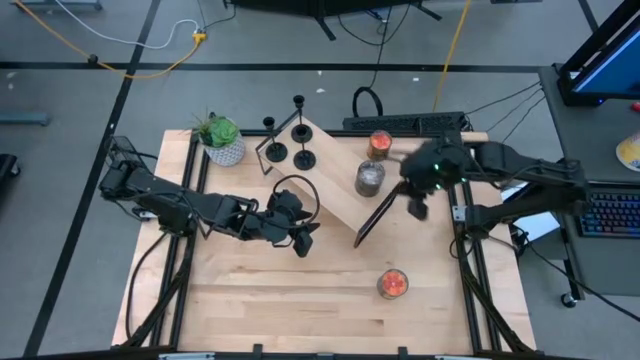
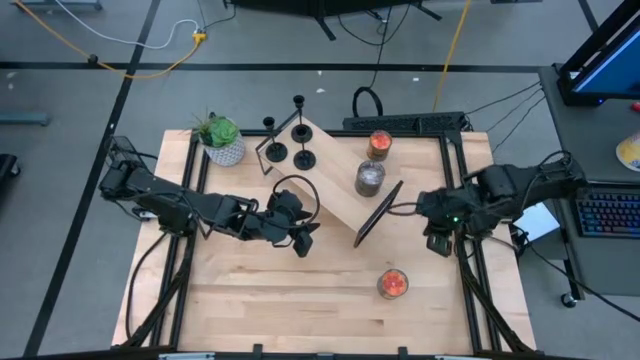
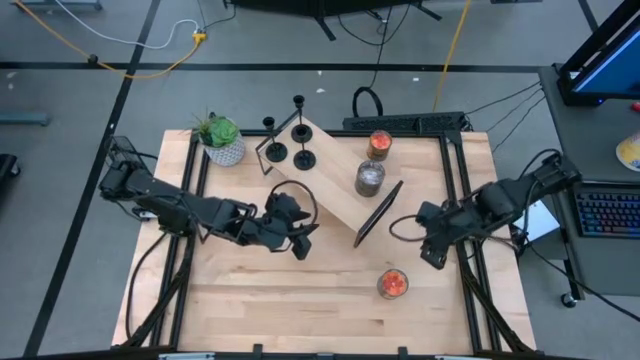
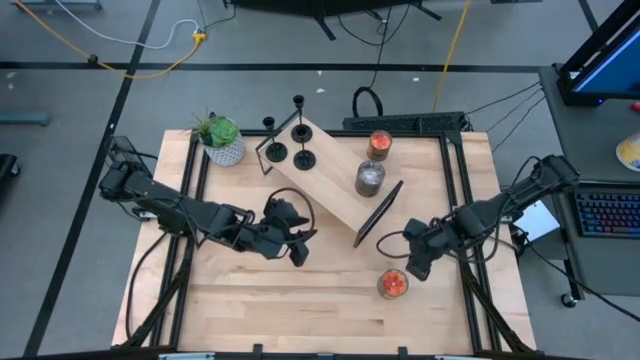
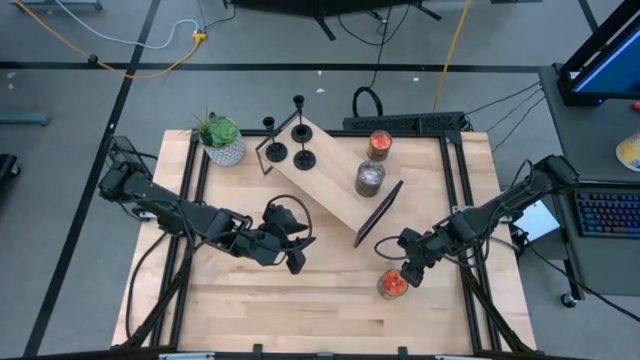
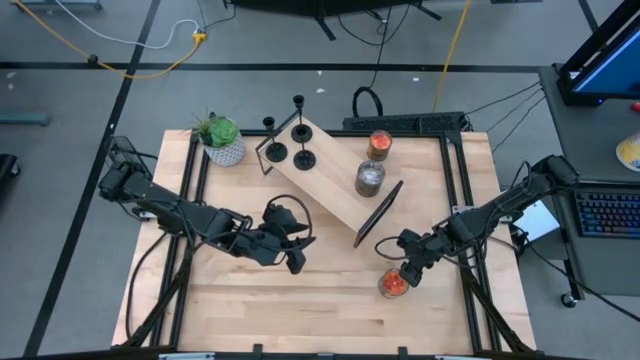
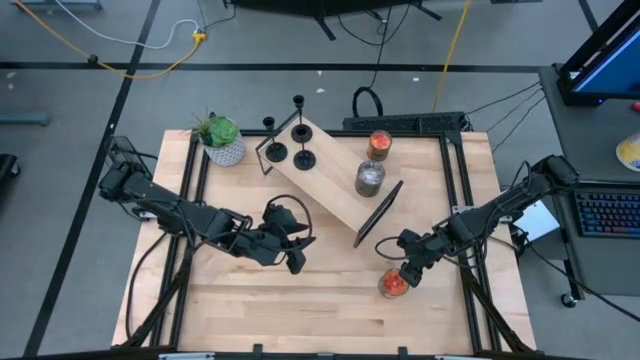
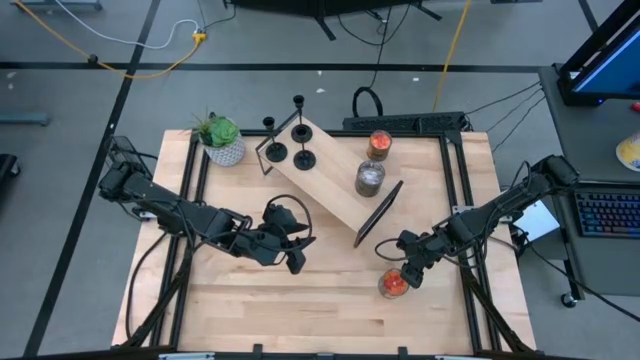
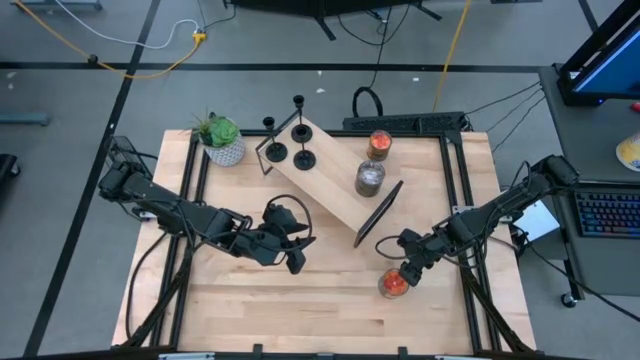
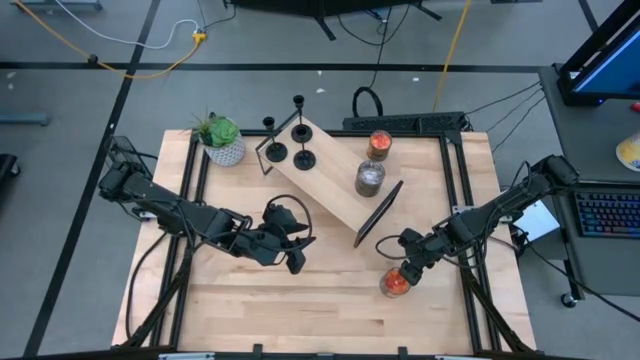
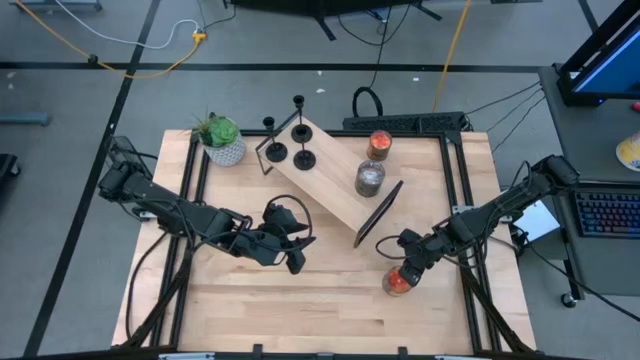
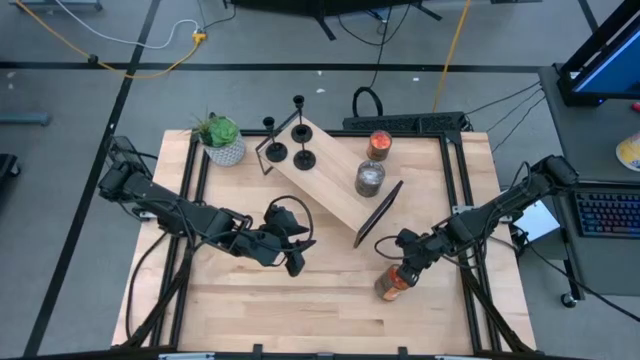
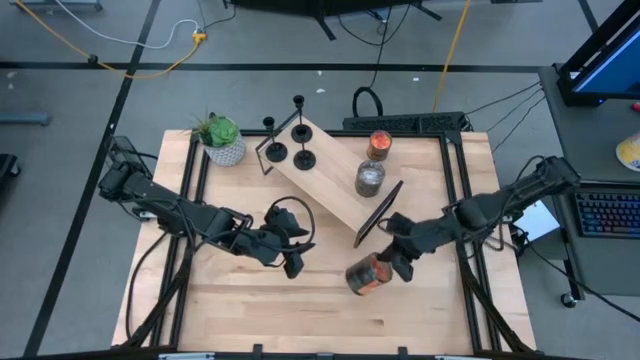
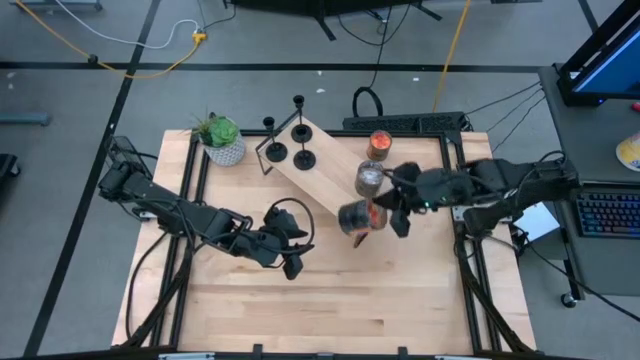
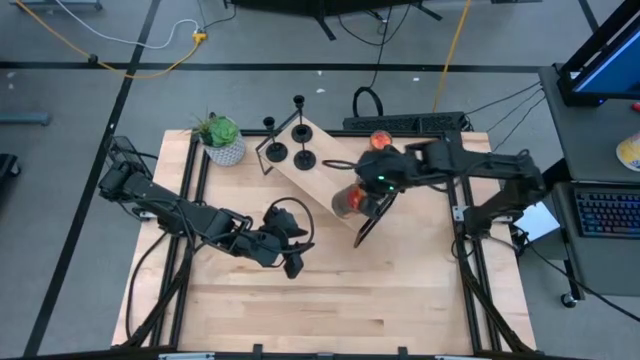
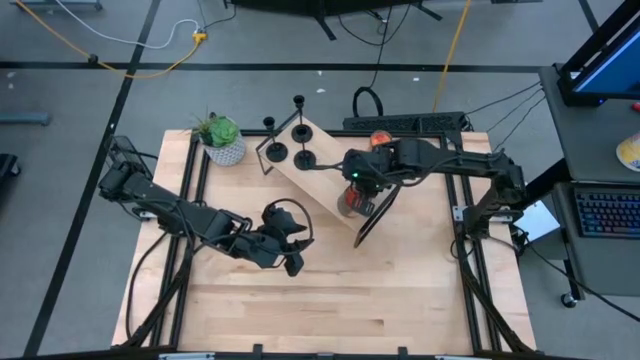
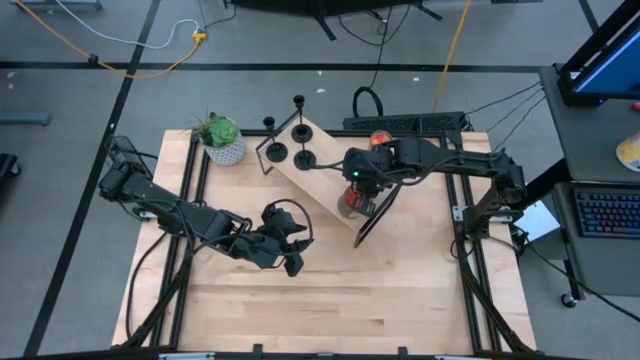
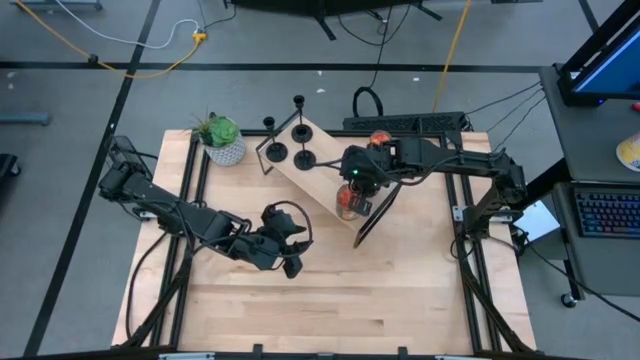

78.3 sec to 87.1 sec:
Task: Pick & Place candle stick holders
Put the bottom orange scented candle on the shelf

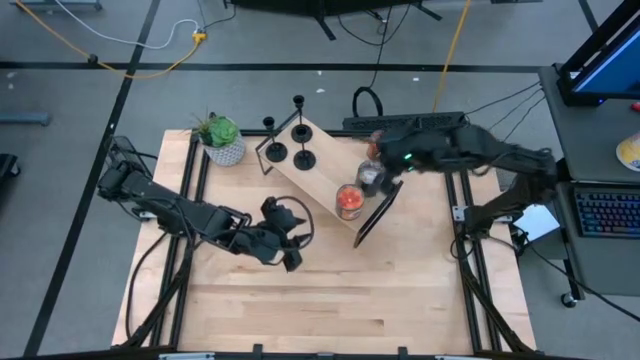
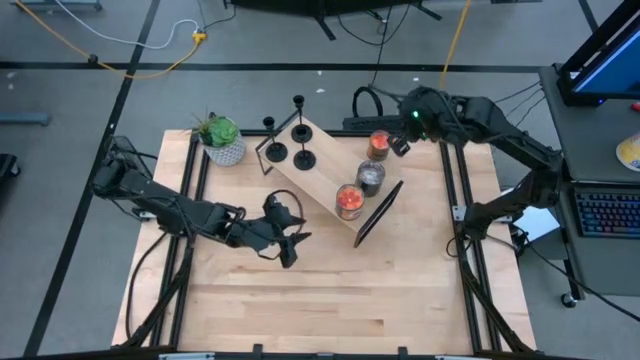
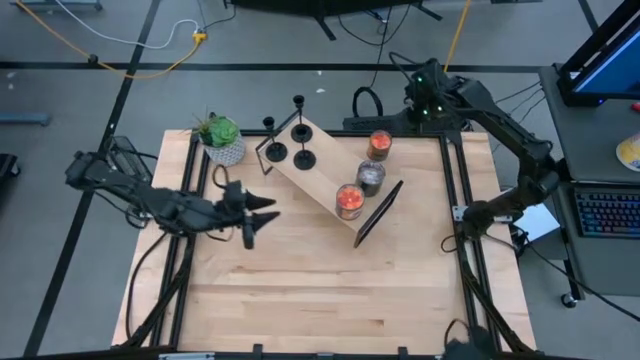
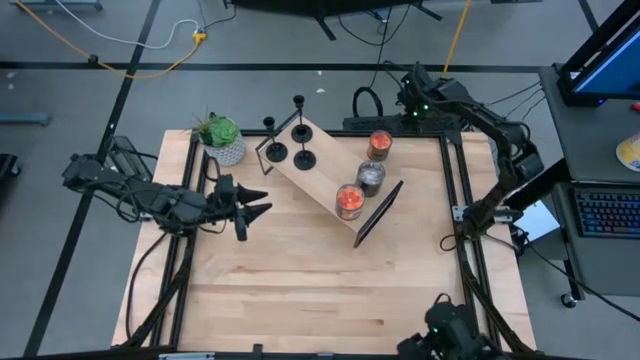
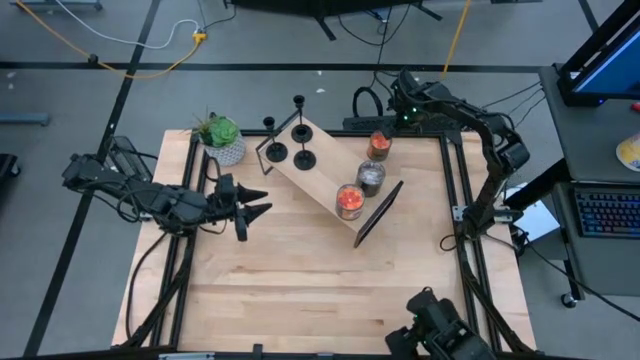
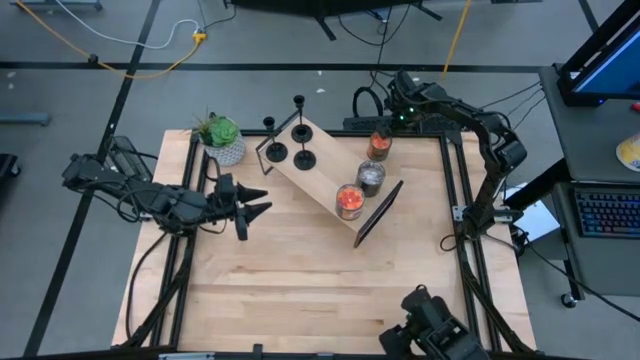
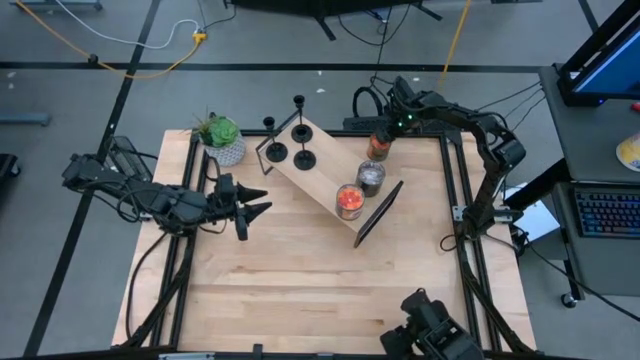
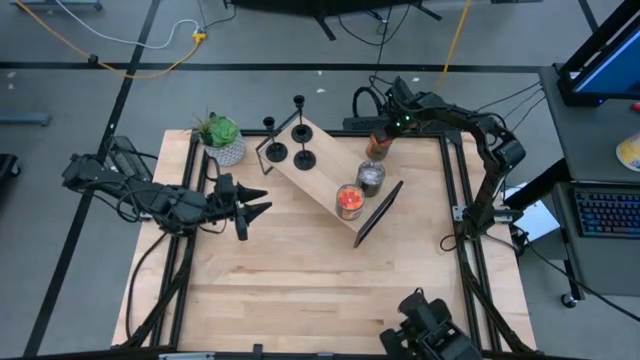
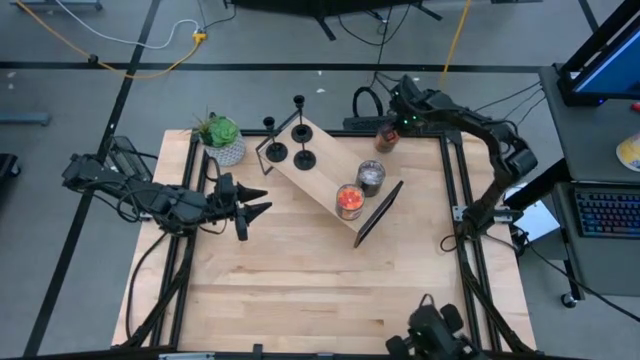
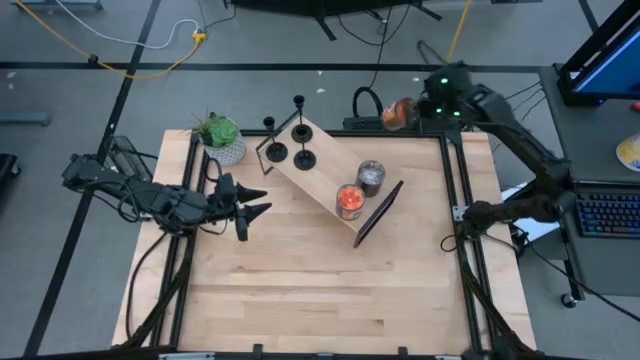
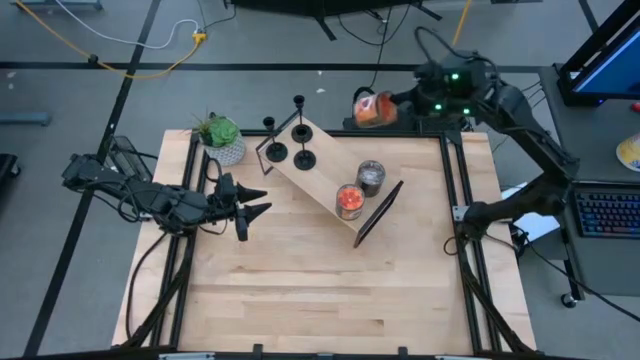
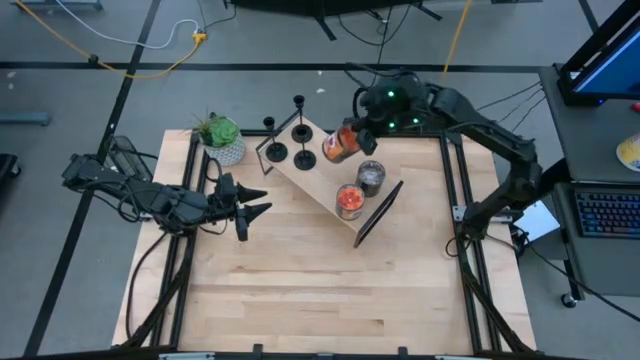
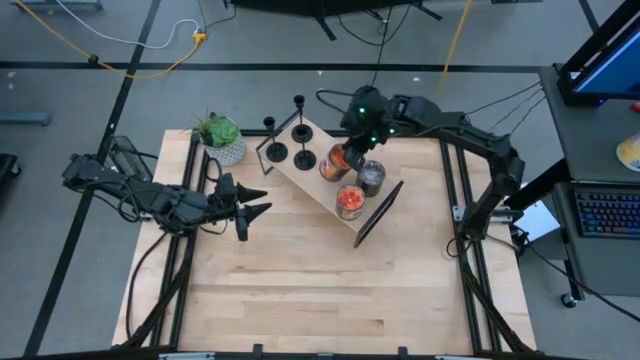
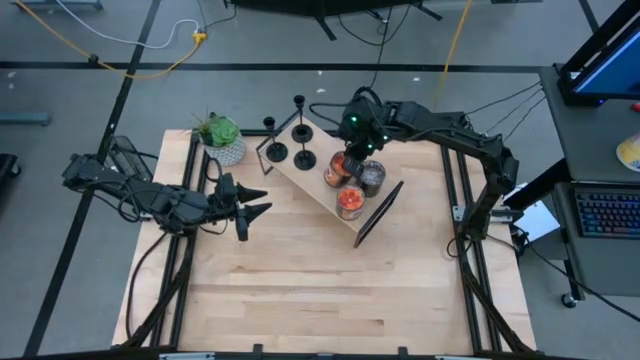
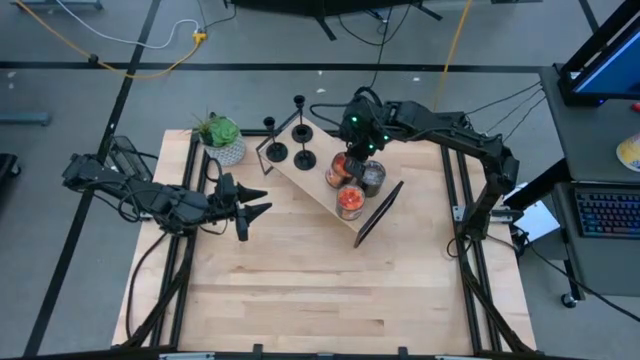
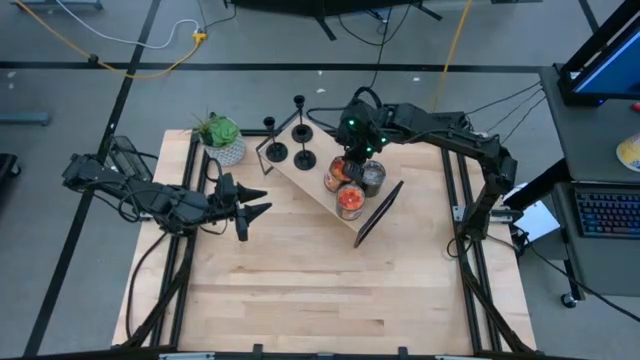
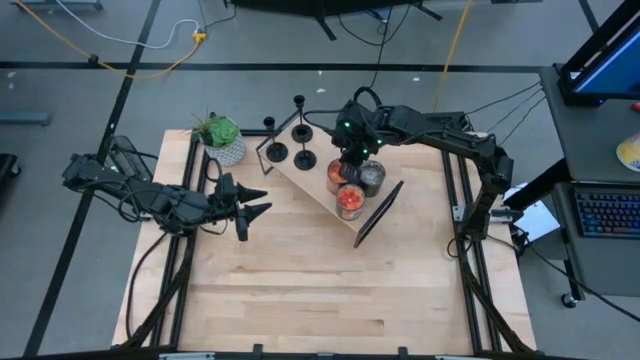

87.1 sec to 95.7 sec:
Put the orange scented candle on the shelf

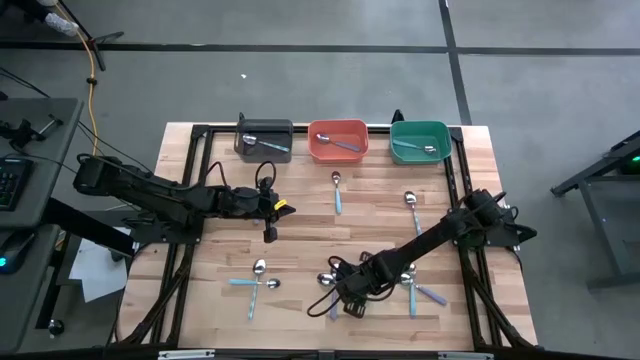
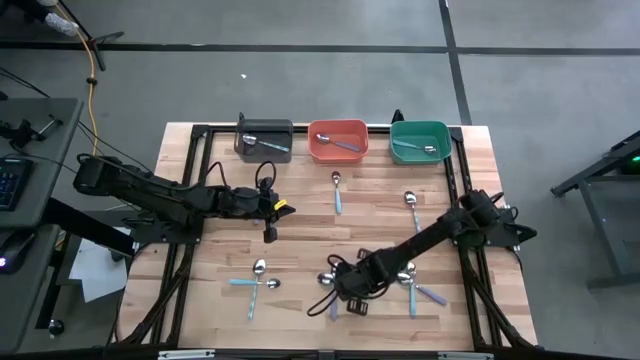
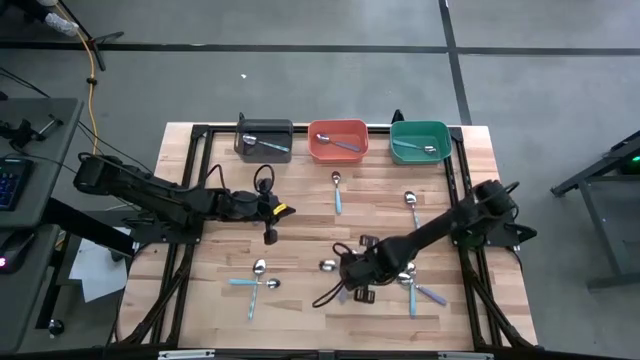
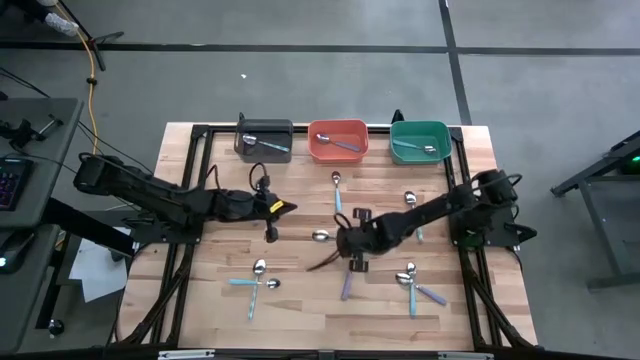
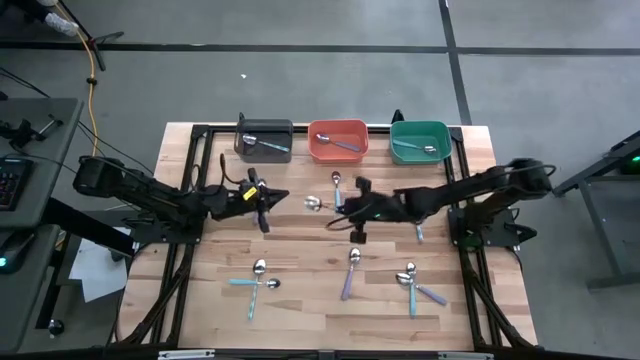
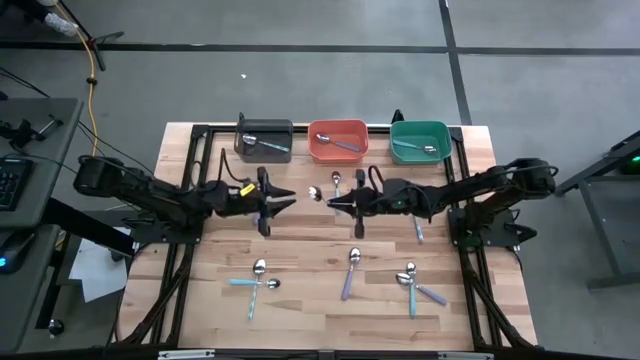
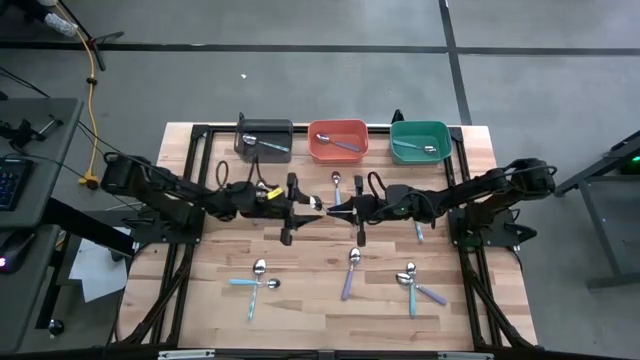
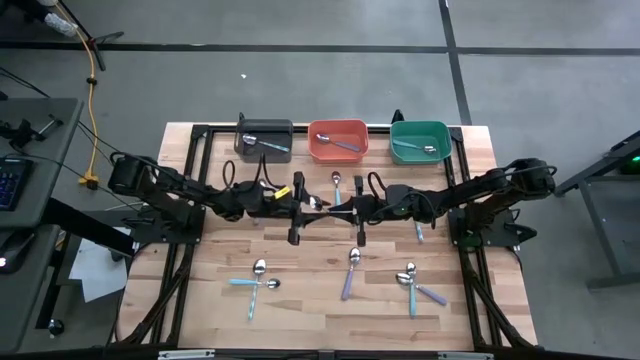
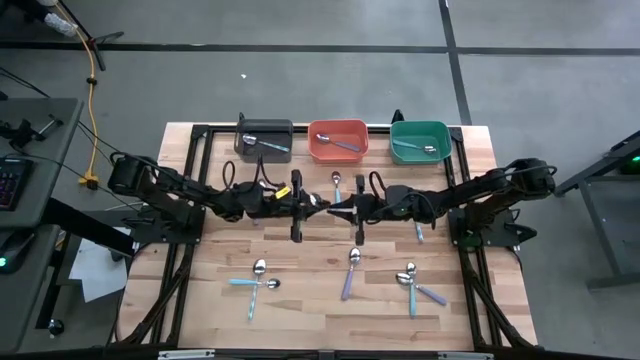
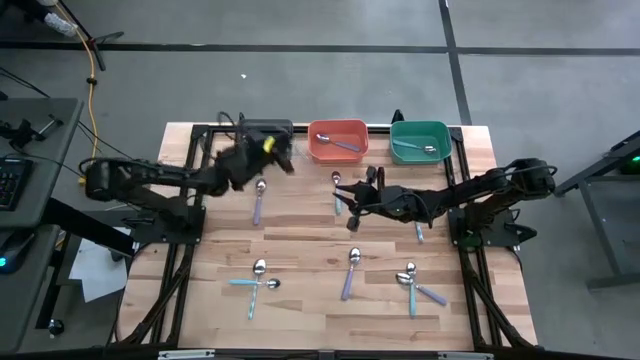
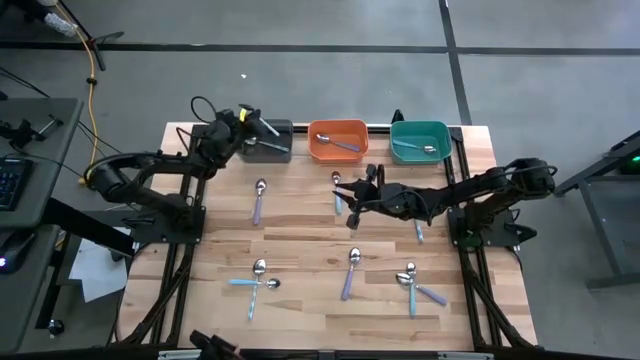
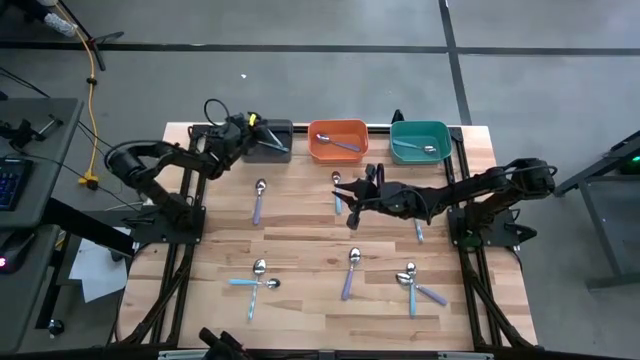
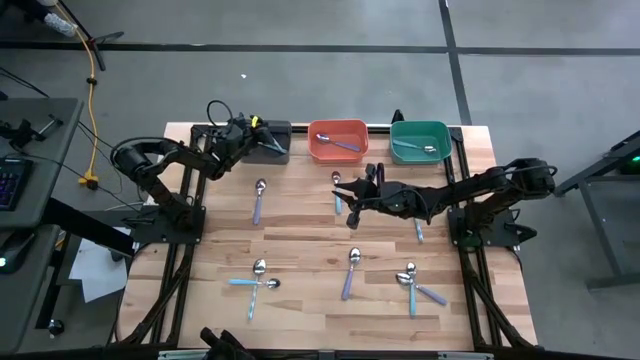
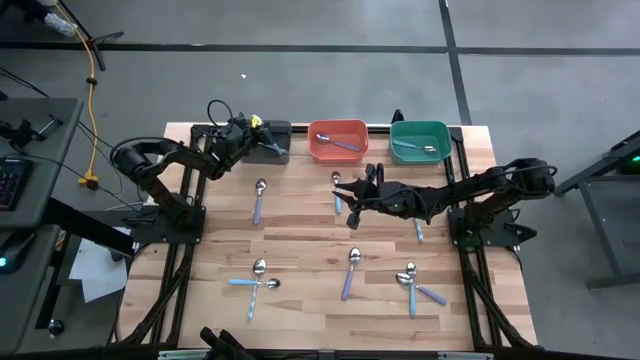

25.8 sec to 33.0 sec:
Task: Sort silverware by color (type)
Put the blue patterned spoon into the black bin
